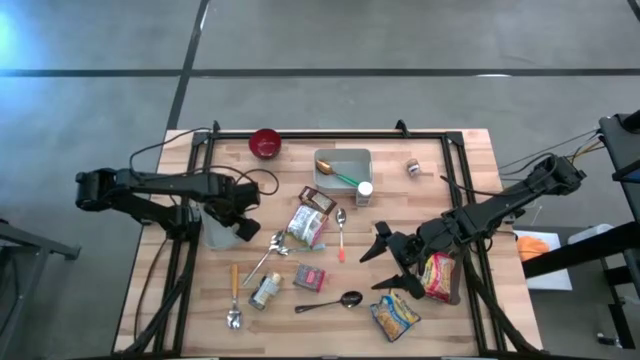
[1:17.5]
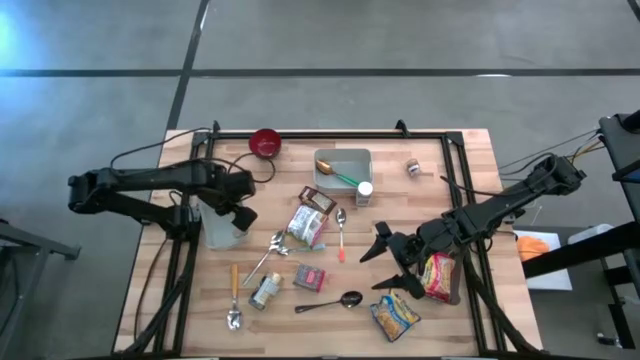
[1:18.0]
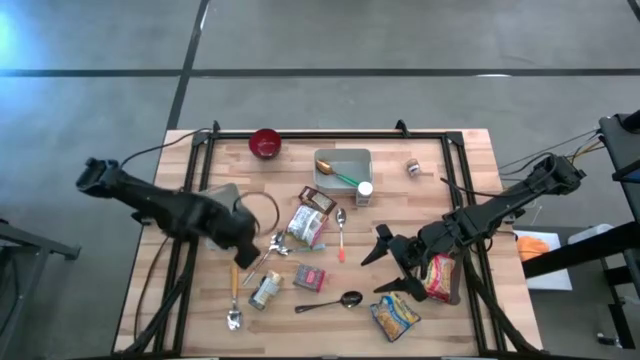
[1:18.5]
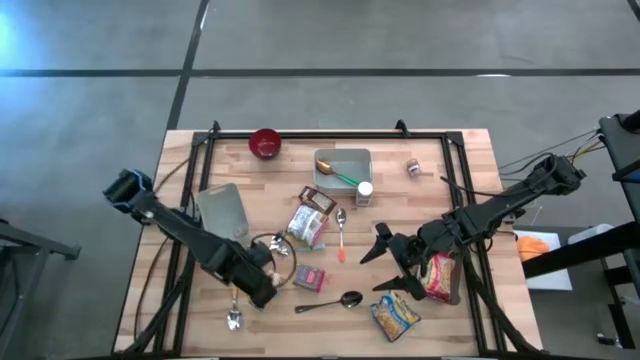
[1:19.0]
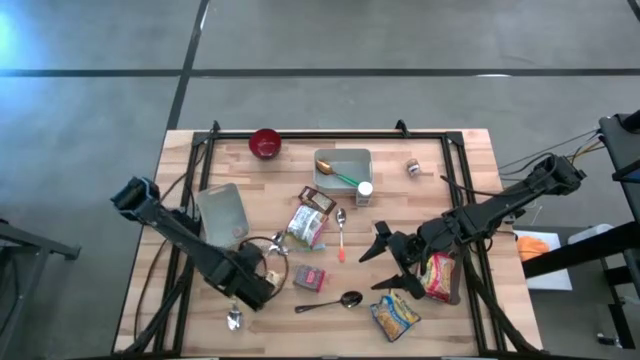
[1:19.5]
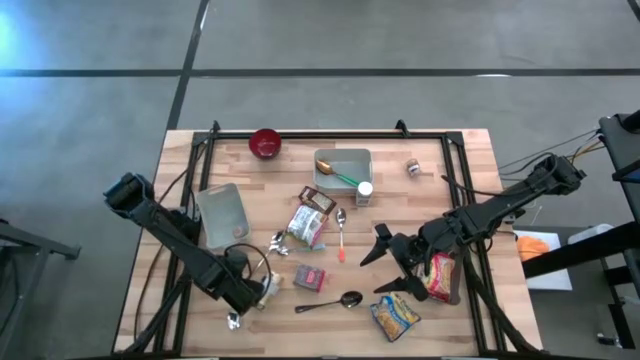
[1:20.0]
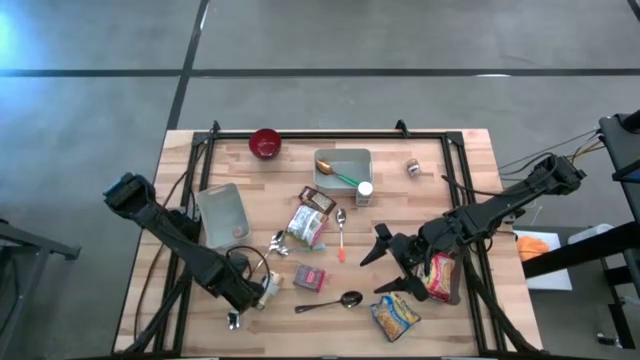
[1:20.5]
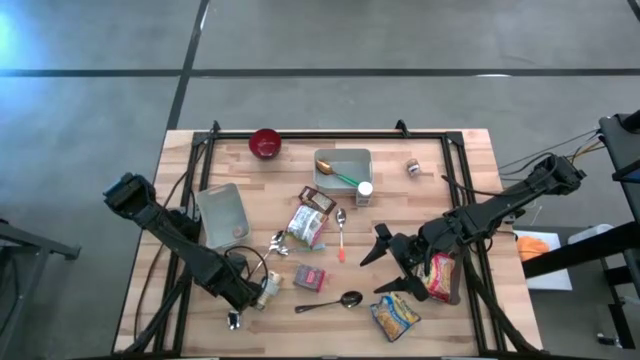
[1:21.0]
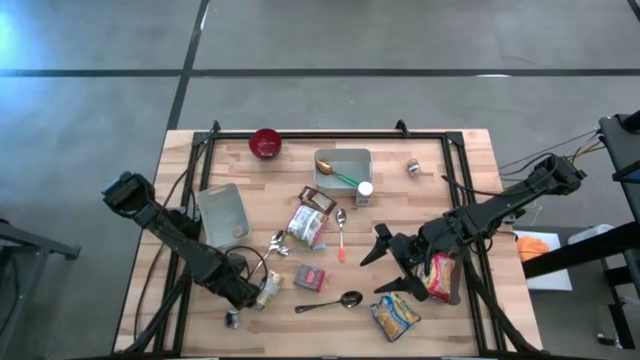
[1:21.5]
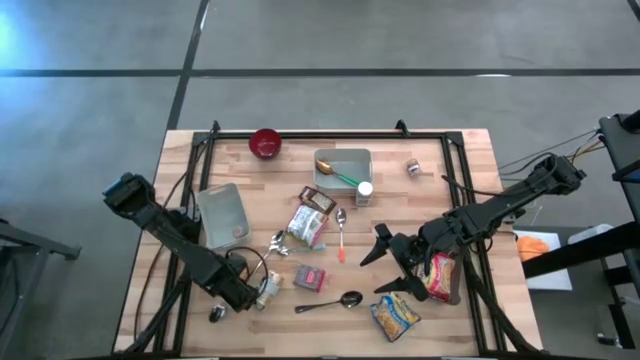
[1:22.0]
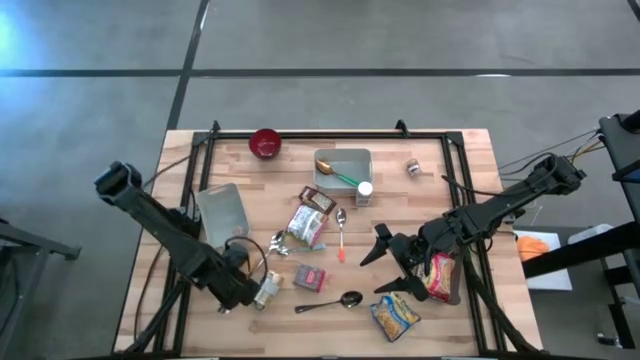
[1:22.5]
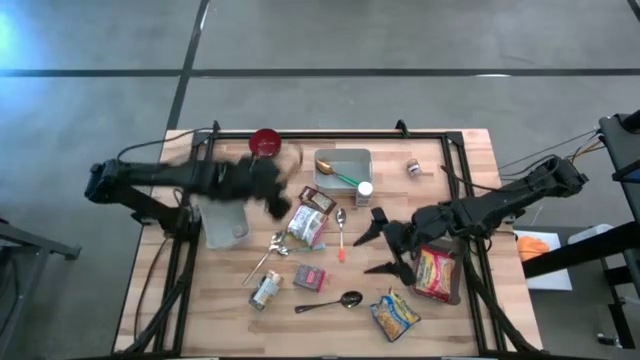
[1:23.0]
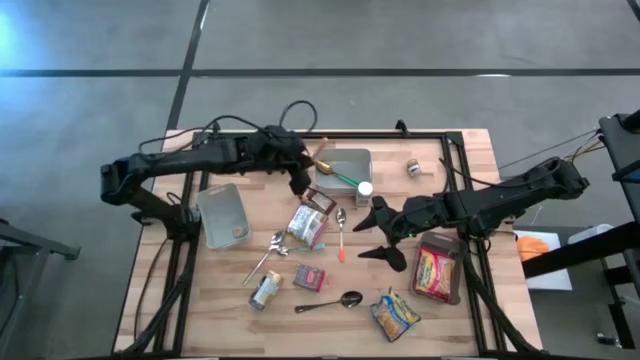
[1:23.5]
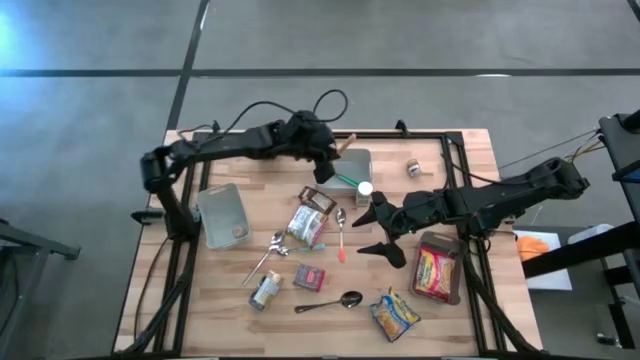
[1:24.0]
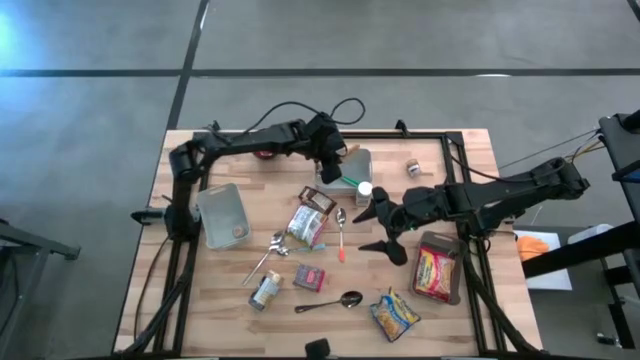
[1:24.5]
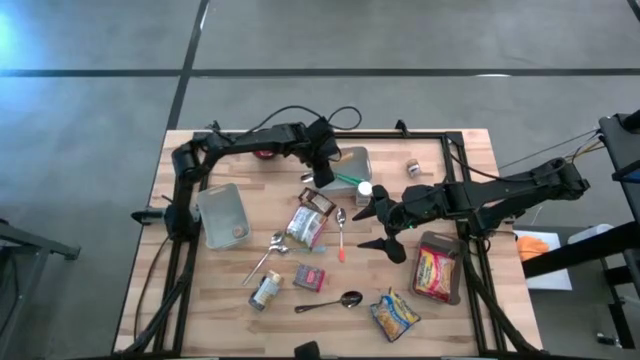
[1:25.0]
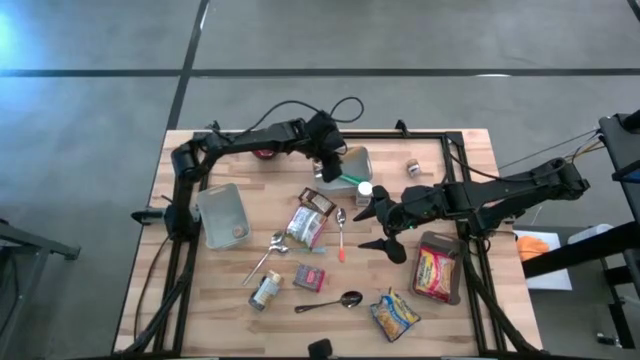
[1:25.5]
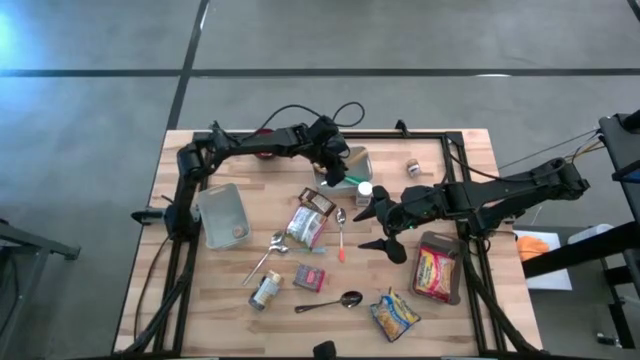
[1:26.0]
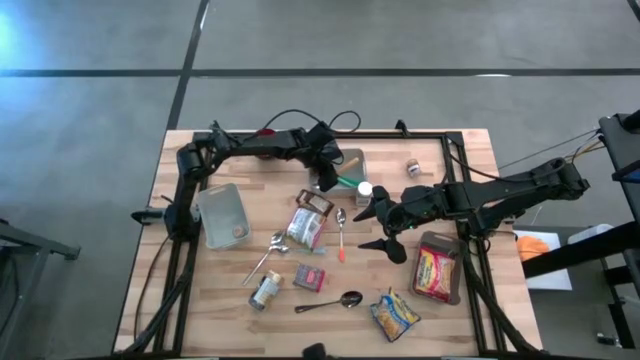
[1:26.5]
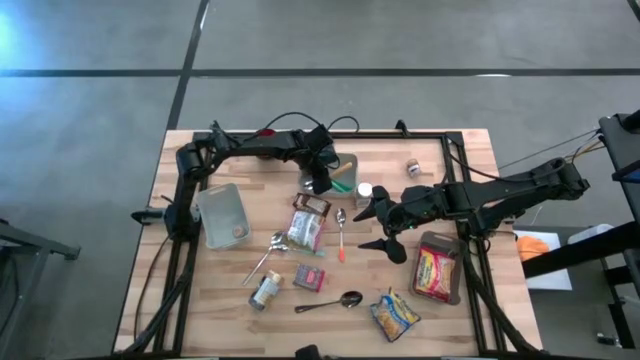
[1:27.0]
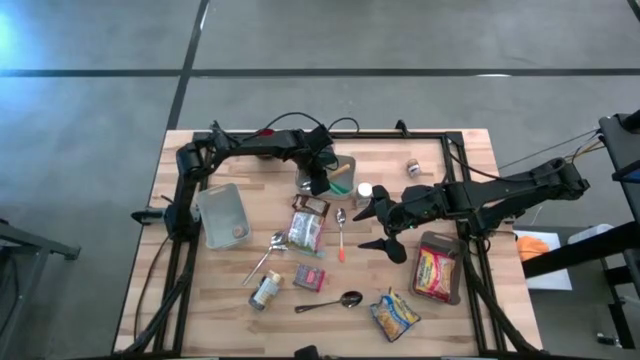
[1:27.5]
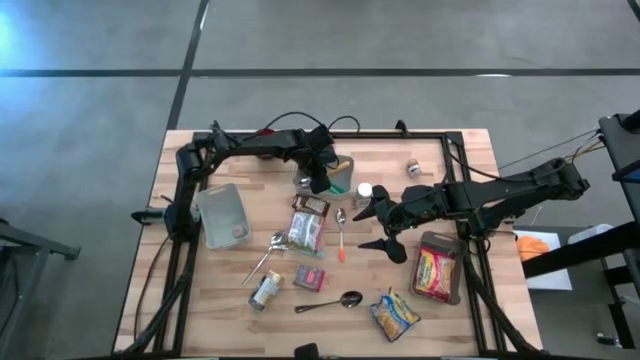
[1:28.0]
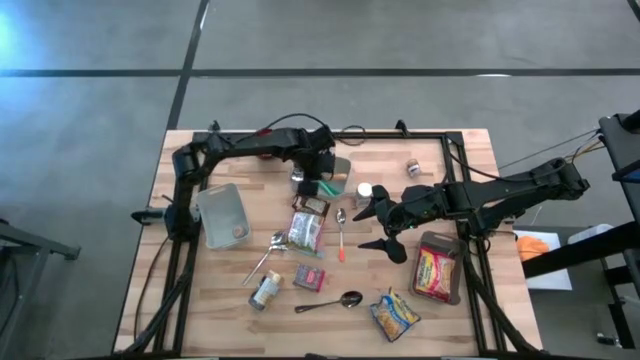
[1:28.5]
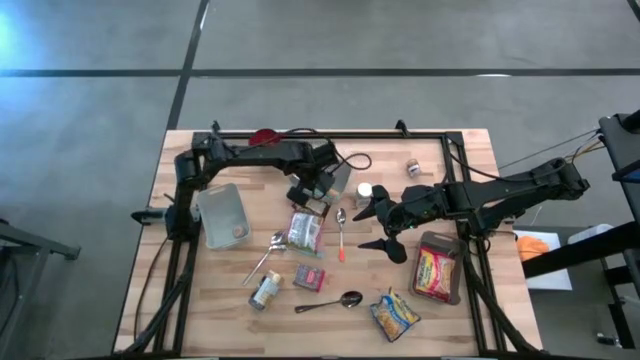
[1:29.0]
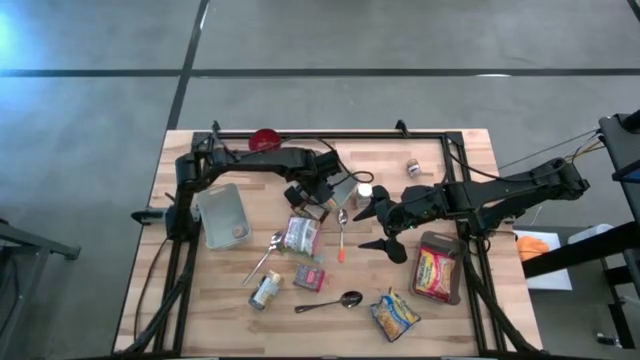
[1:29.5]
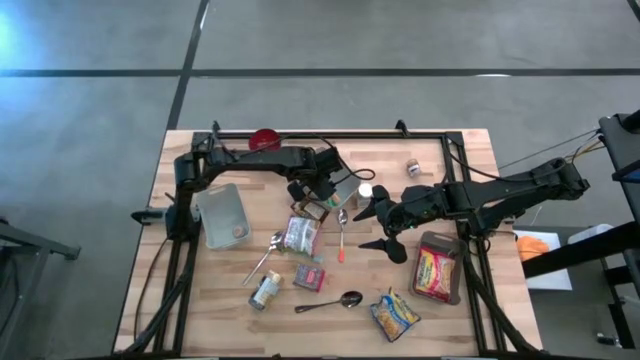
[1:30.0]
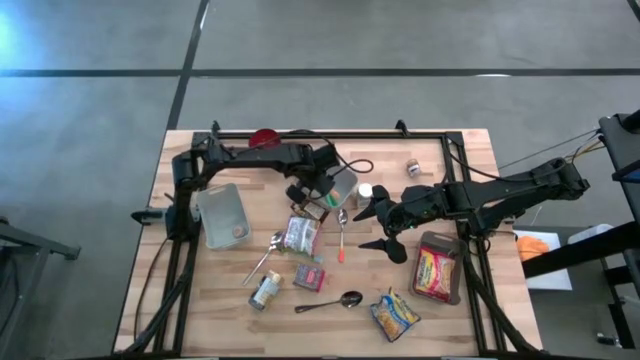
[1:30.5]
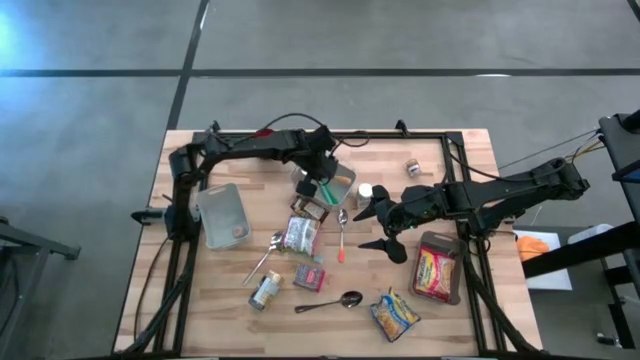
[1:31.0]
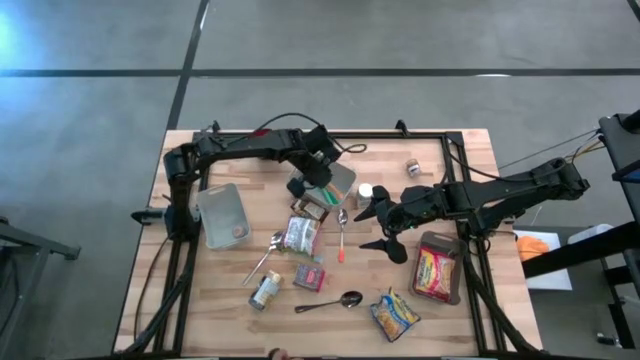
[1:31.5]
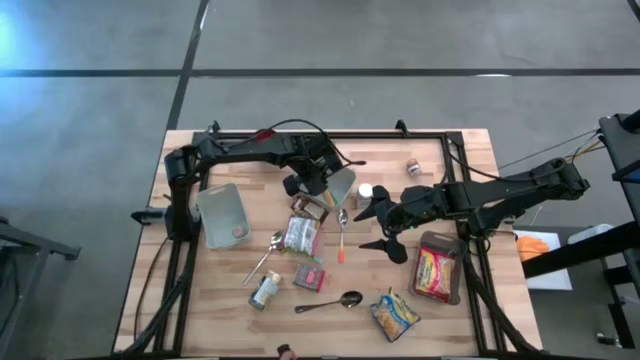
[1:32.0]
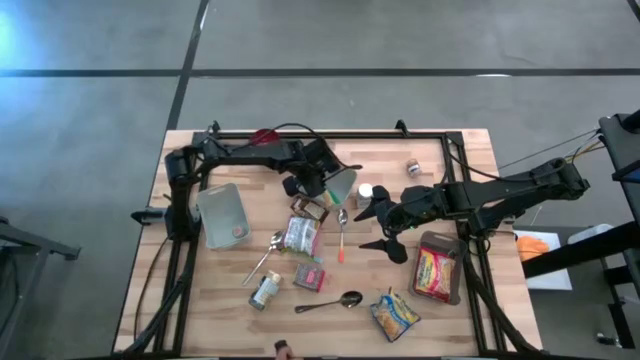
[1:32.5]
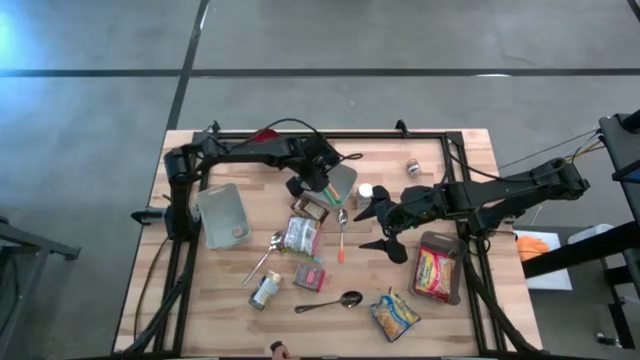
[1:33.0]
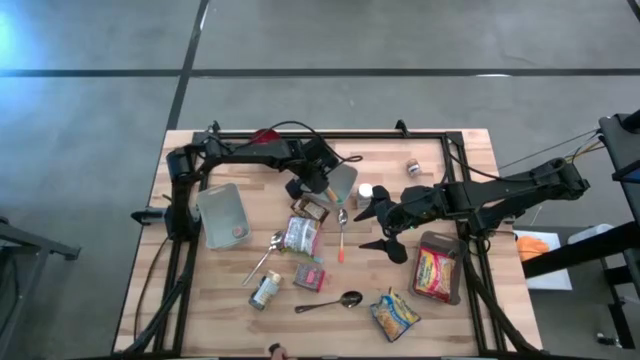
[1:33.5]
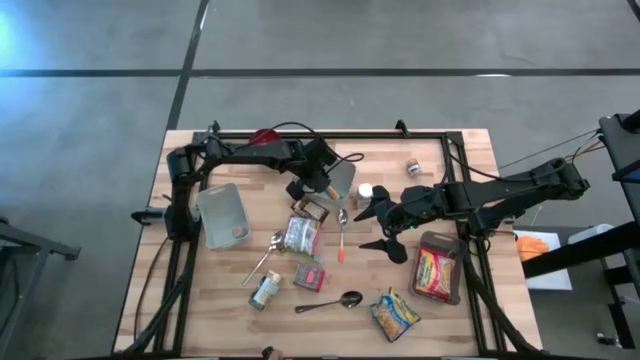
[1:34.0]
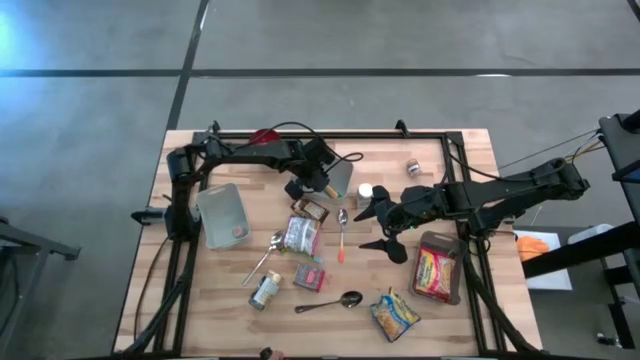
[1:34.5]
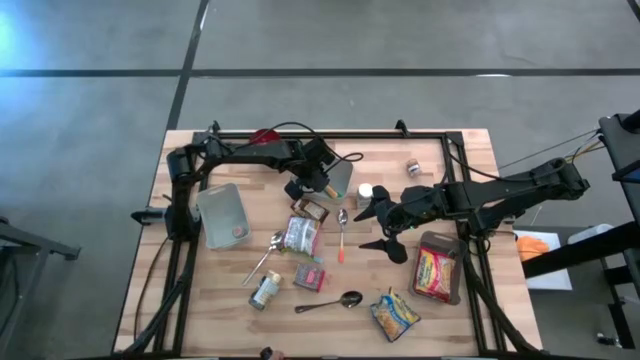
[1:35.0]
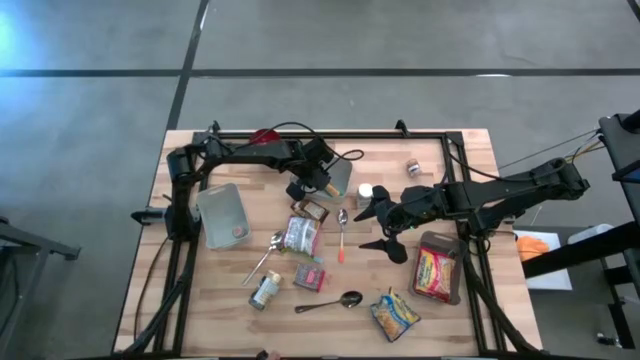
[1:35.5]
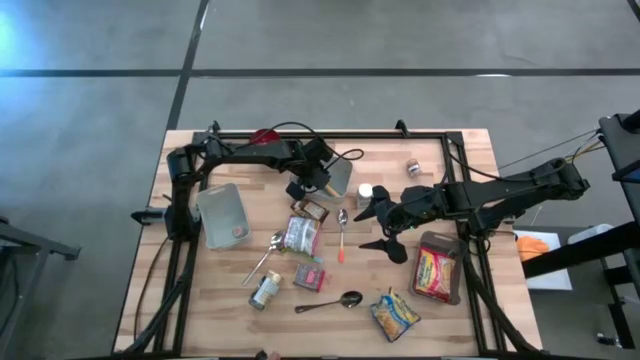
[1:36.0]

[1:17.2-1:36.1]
Put the yellow spoon into the right gray bin

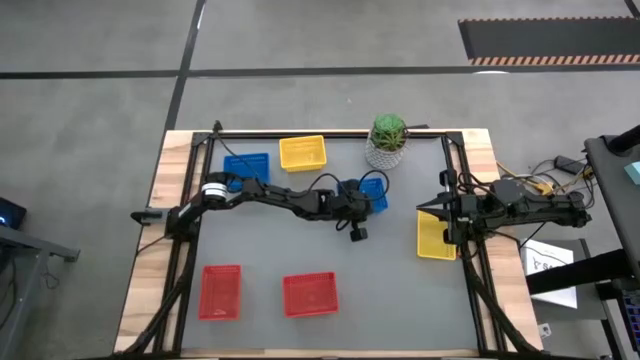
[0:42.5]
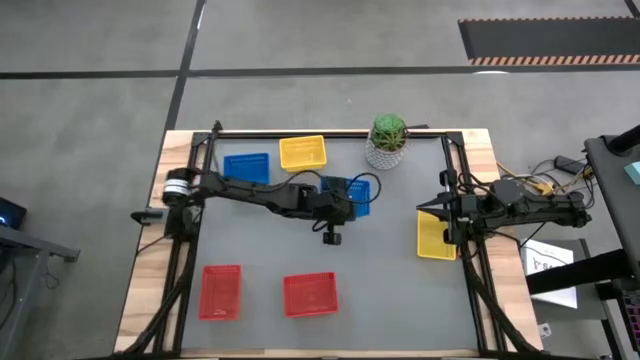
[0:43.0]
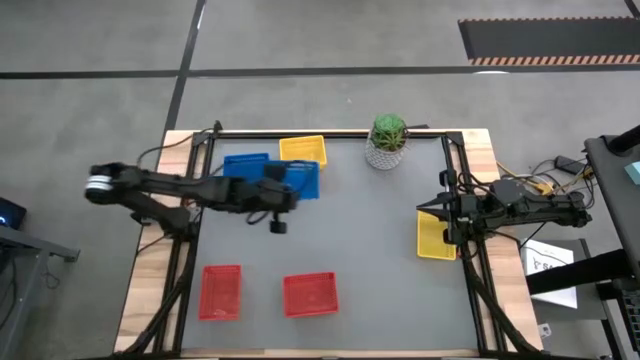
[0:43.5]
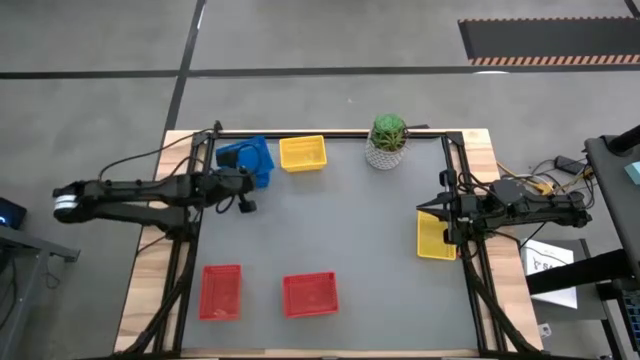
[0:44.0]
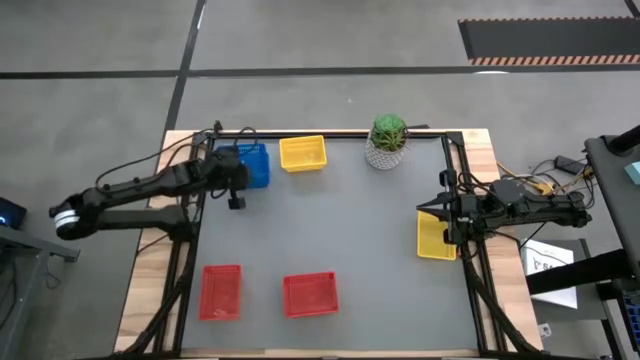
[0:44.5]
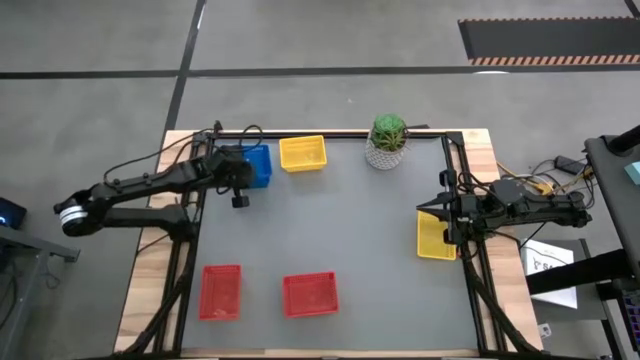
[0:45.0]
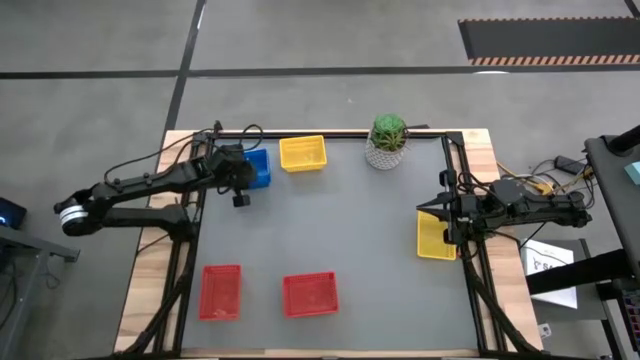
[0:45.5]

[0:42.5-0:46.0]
Stack the blue basket on top of the blue basket
